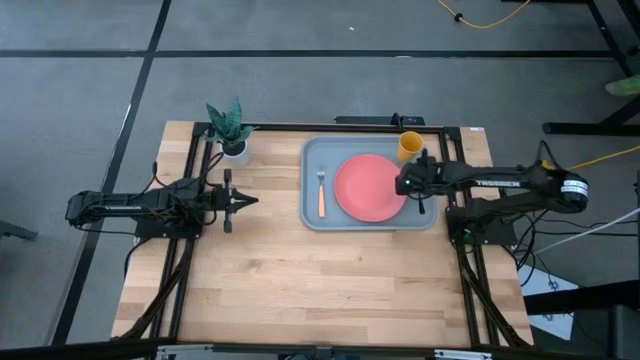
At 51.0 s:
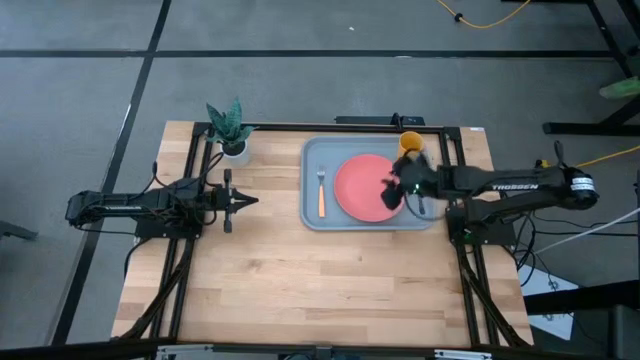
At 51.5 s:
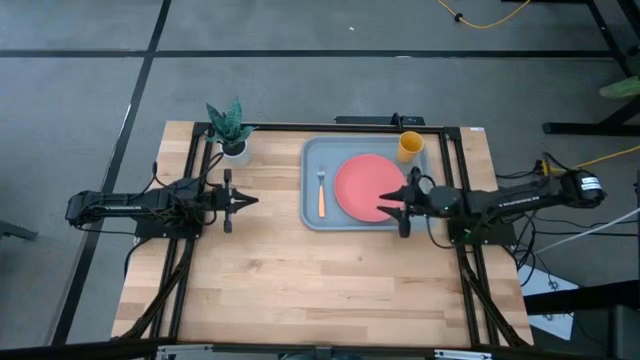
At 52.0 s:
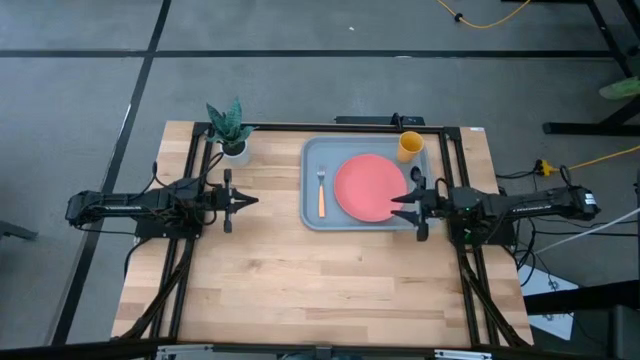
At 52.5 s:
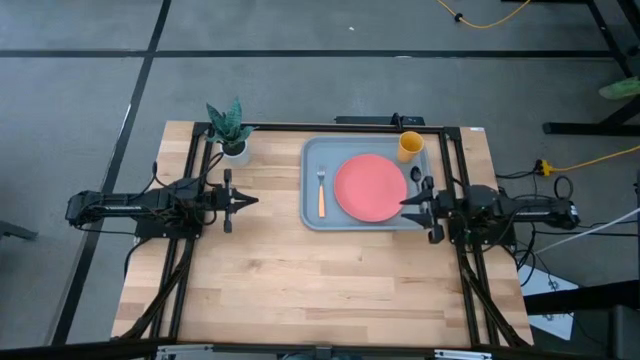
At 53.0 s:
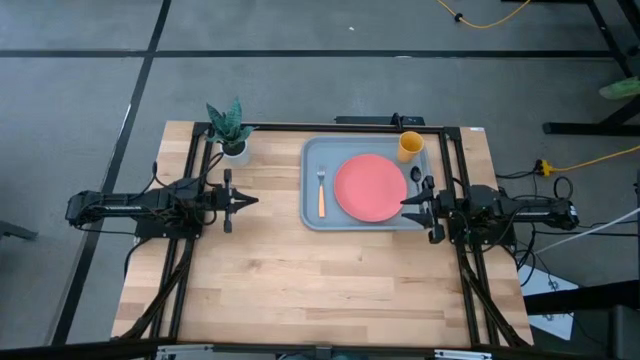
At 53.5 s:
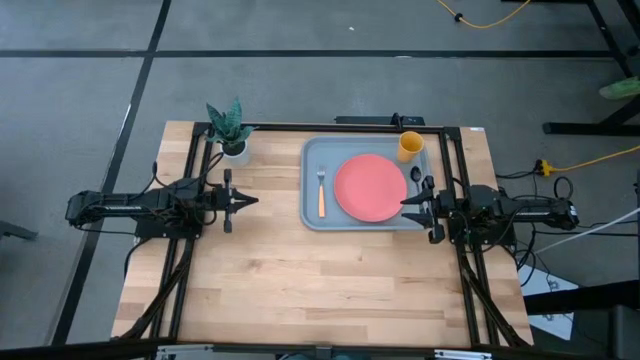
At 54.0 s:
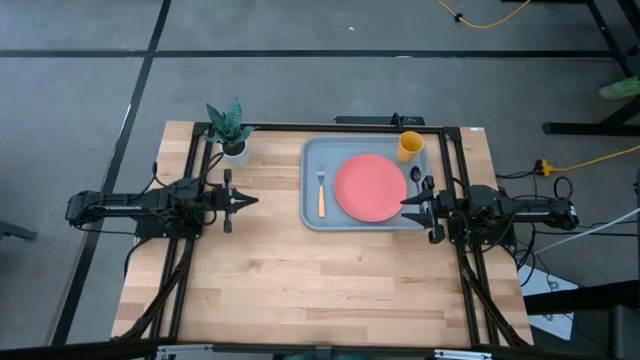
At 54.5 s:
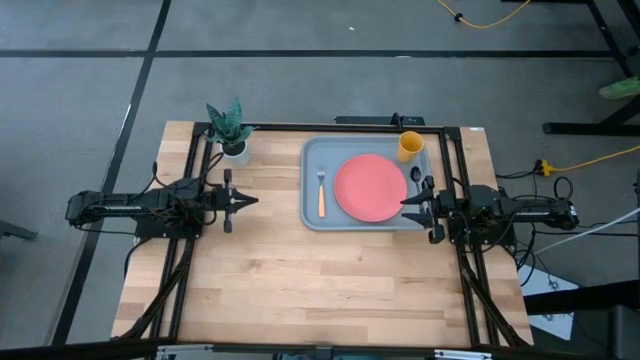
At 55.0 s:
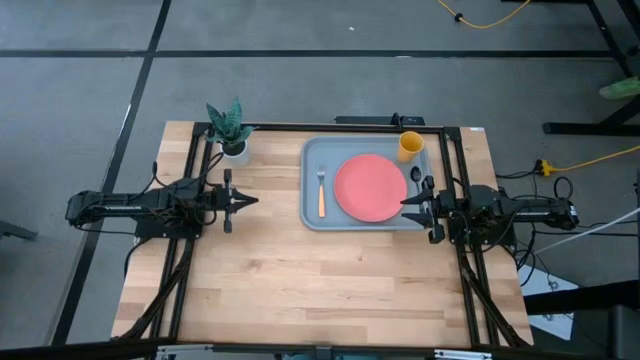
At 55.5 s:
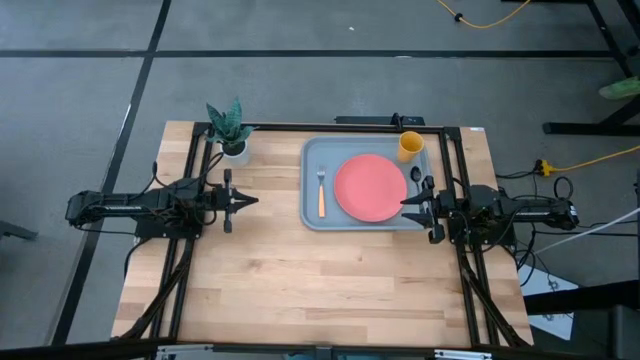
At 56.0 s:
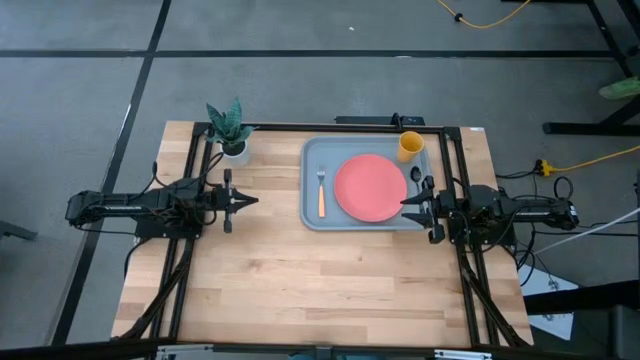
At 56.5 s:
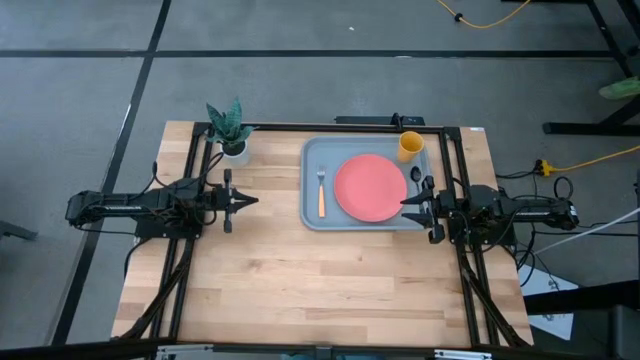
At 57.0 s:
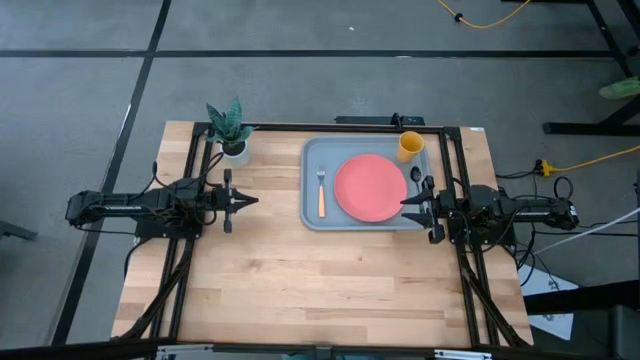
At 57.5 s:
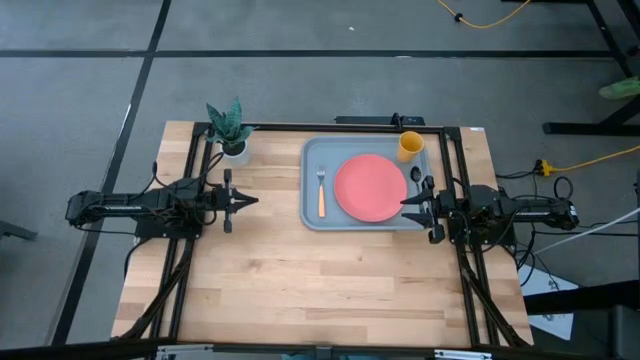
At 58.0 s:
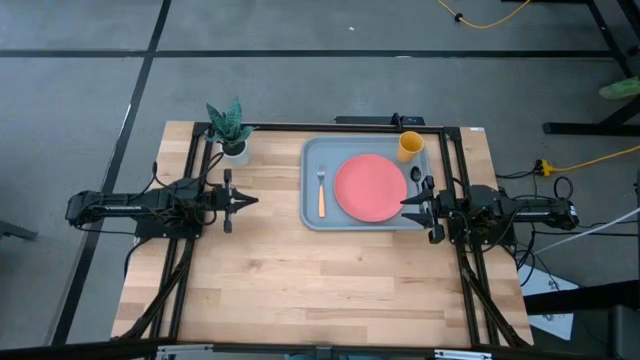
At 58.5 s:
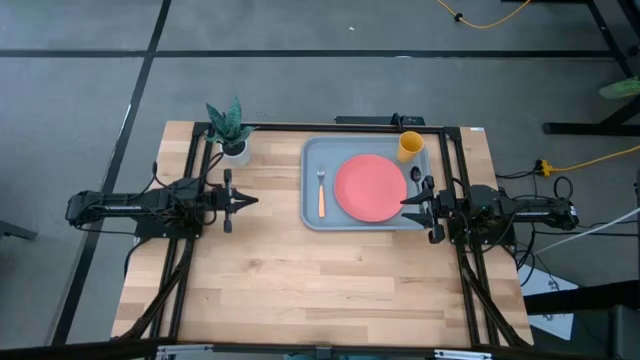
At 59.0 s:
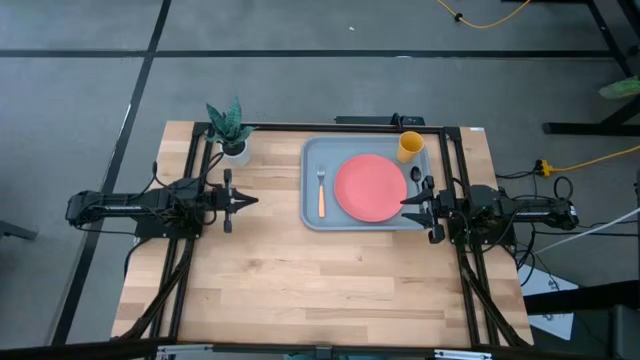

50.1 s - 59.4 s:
Task: Pick and place plate/cup/fork/spoon on tray
Return to Home Position

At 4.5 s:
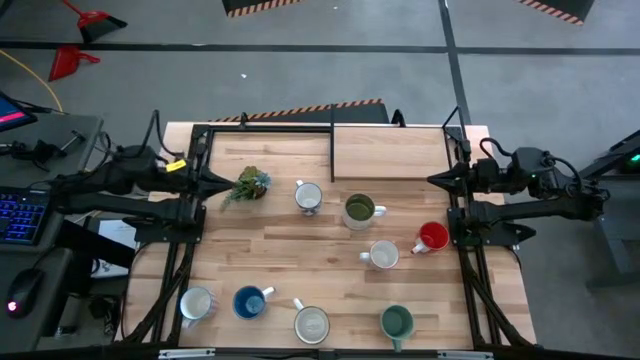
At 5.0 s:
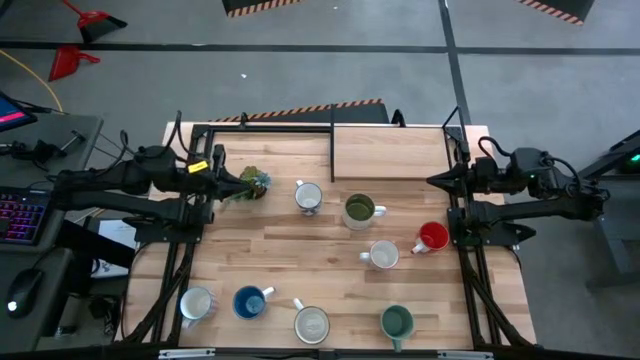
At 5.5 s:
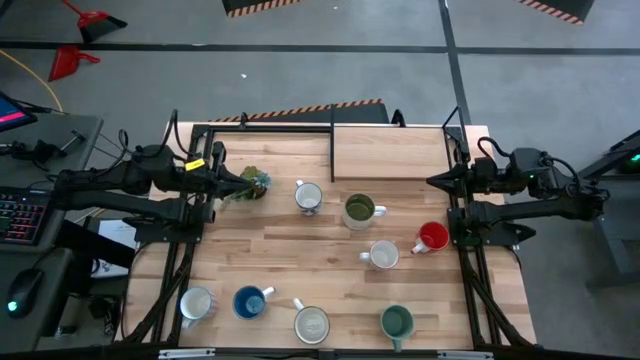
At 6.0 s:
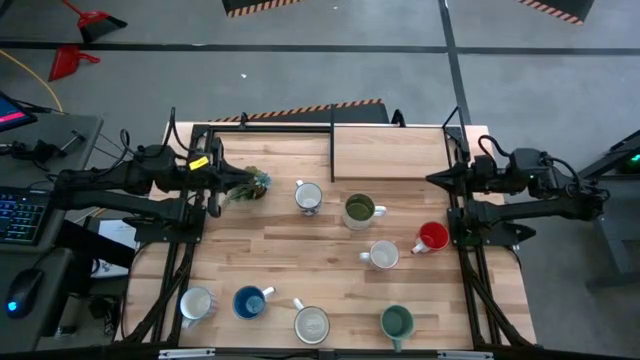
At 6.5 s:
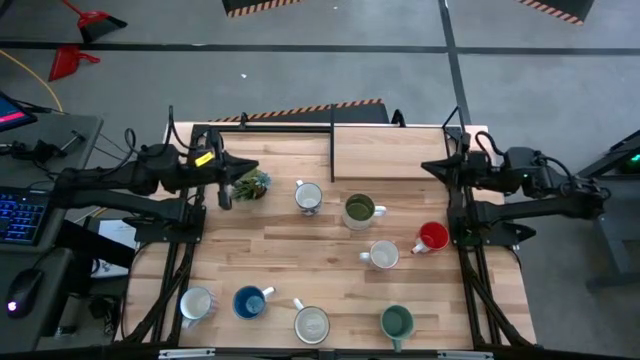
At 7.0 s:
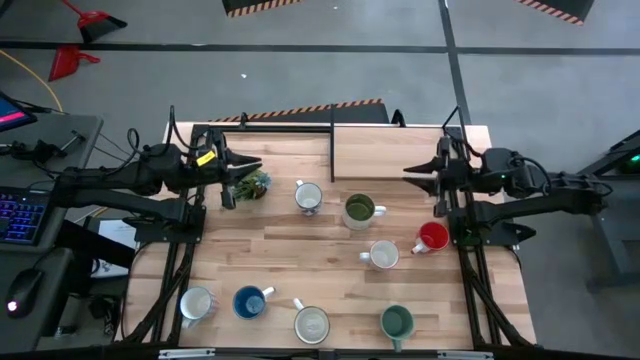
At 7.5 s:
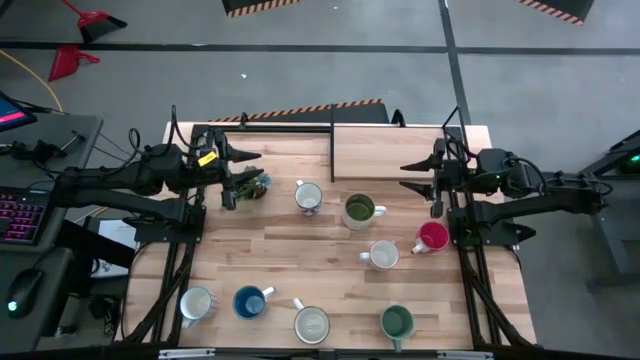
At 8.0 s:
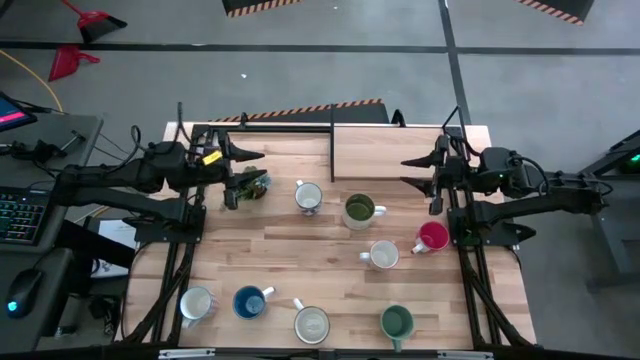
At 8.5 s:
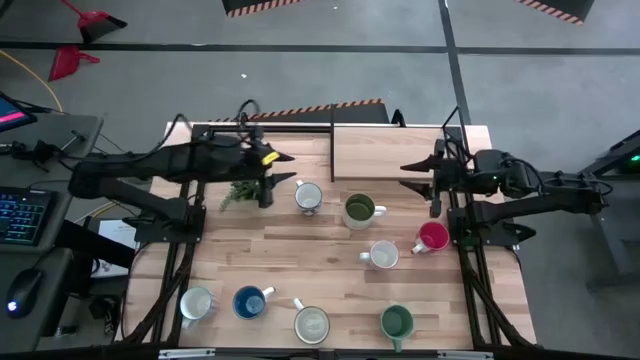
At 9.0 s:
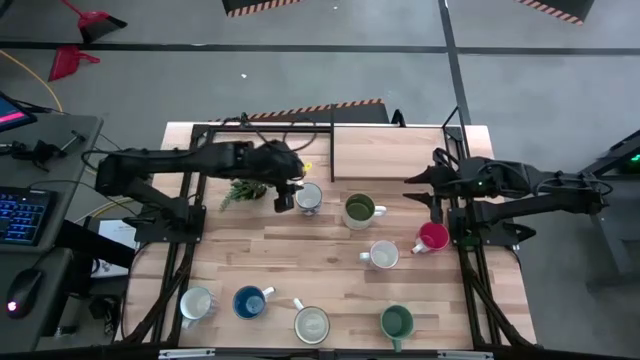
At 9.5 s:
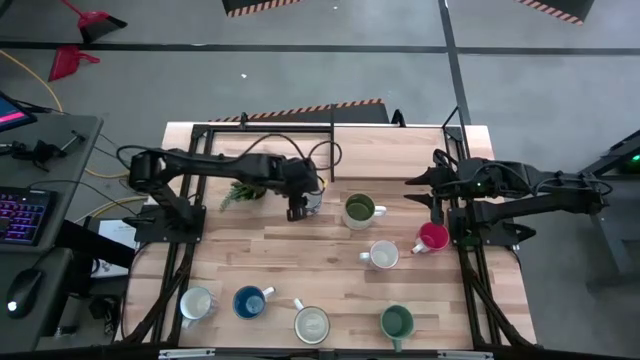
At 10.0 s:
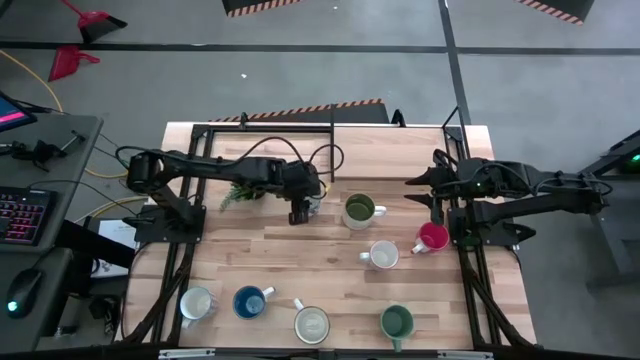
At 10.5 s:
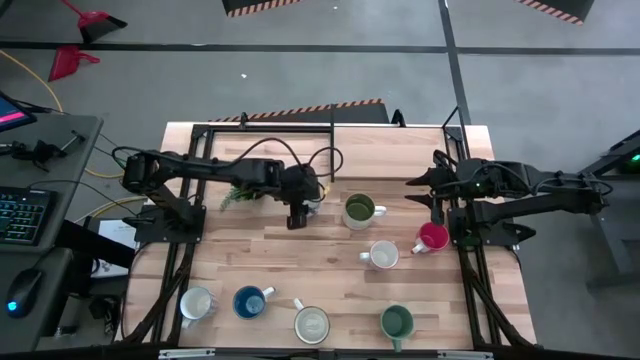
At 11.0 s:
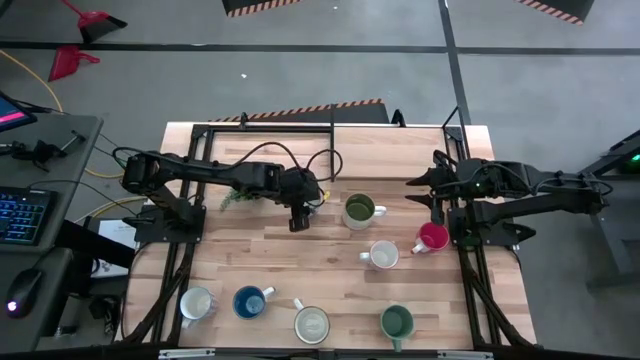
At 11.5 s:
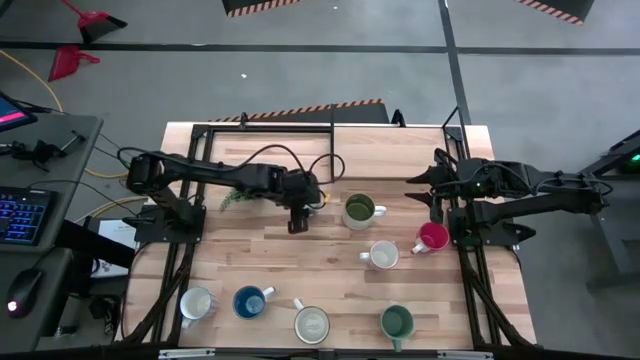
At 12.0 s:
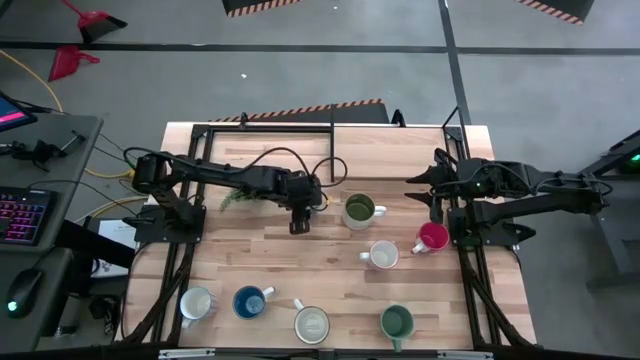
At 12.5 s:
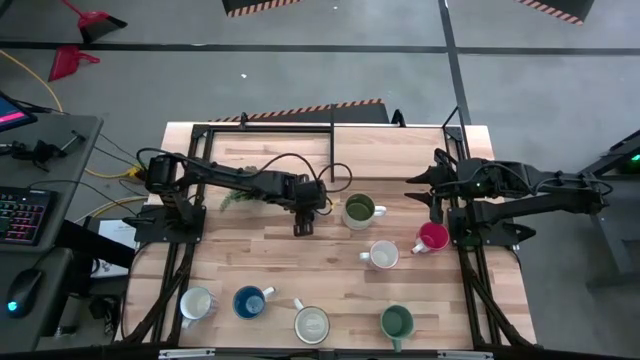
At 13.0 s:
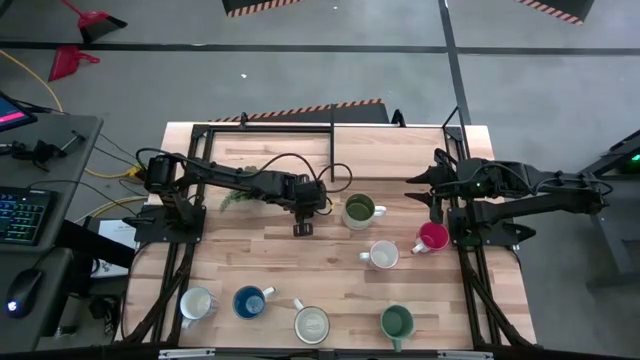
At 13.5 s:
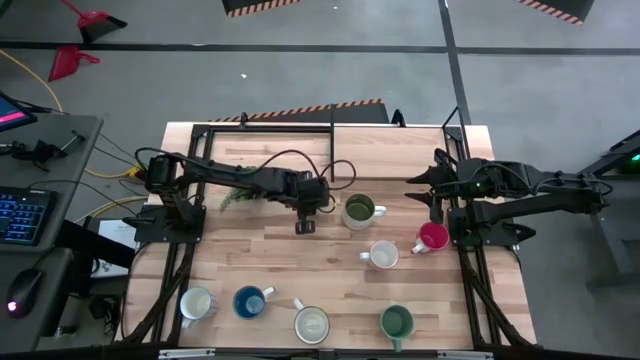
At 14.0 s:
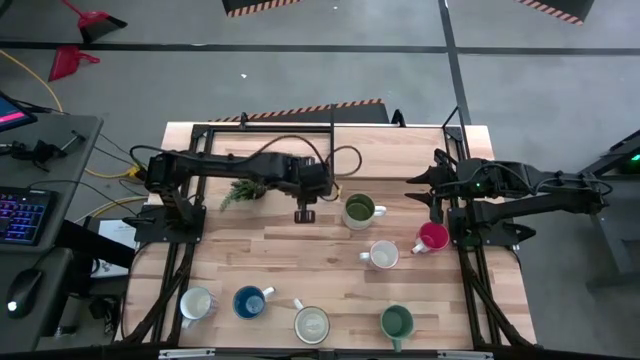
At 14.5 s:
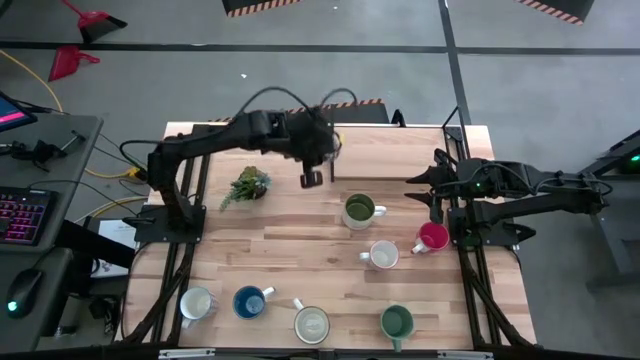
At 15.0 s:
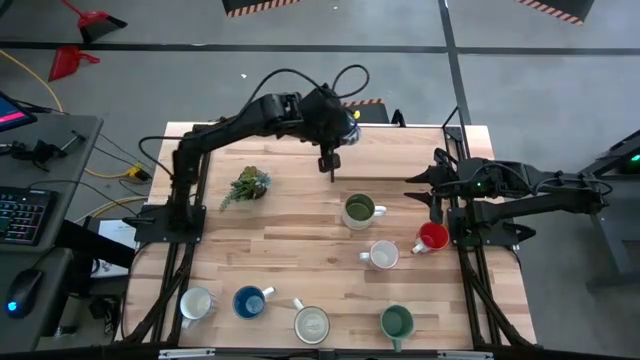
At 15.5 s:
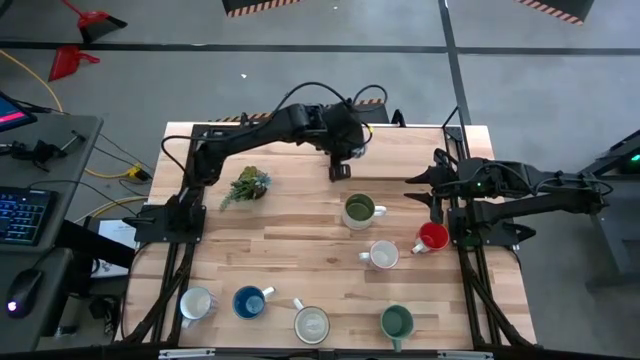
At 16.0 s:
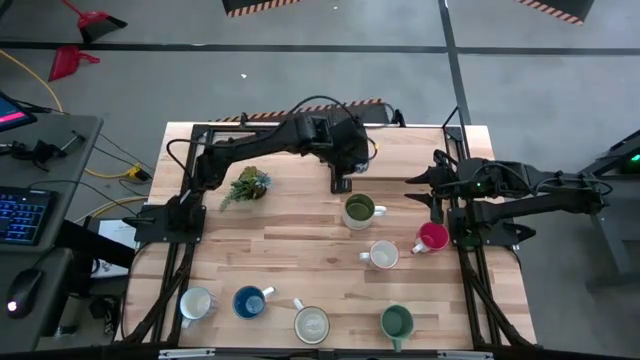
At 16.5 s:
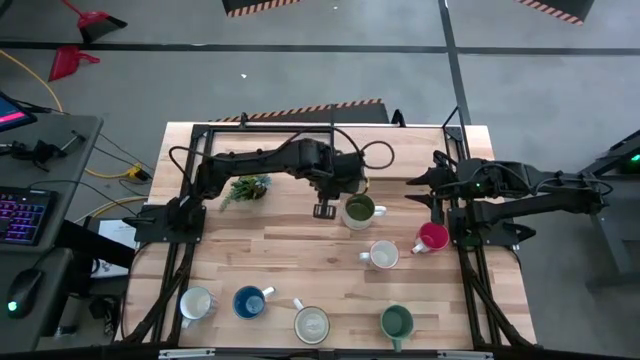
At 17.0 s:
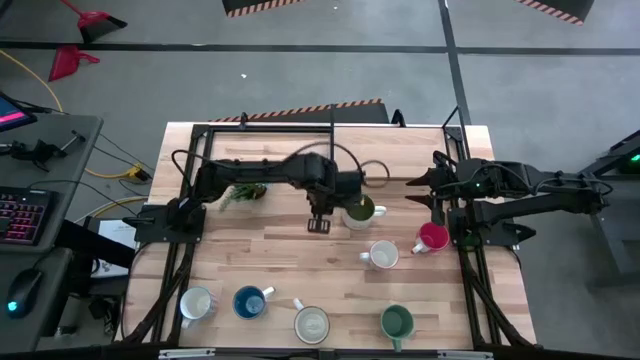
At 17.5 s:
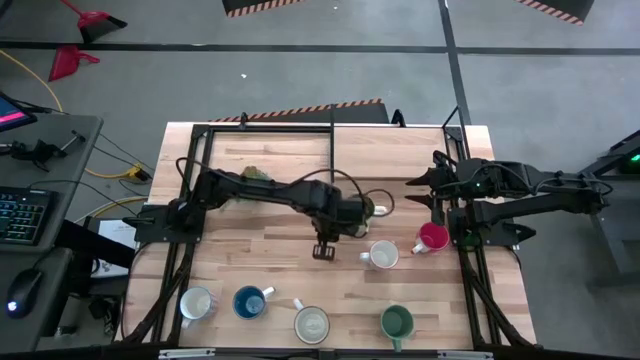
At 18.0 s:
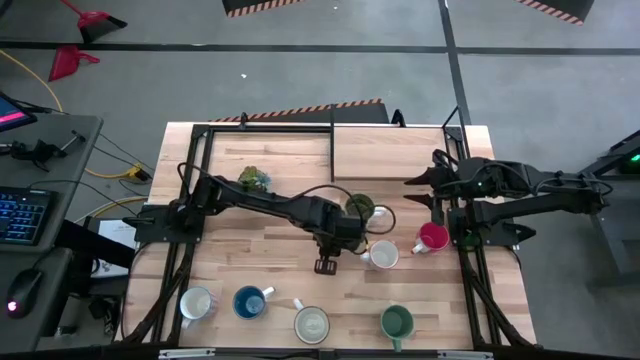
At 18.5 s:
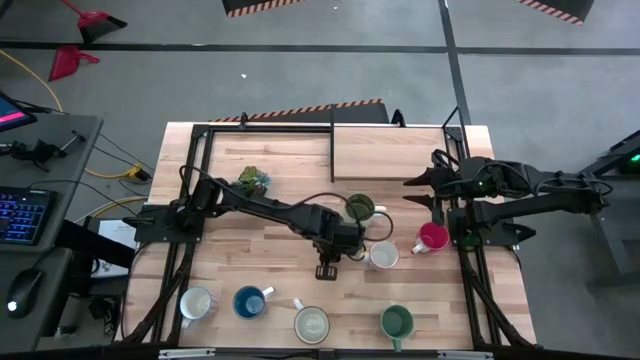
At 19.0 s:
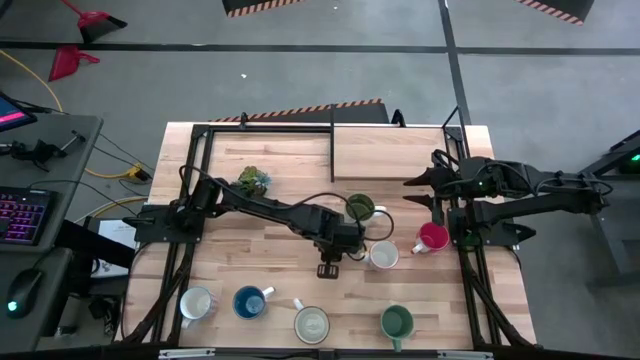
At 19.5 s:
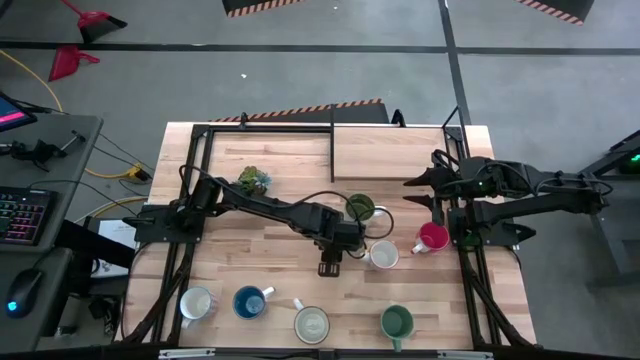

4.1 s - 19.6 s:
Task: Place coffee mugs
Put the white blue mug on the shelf
